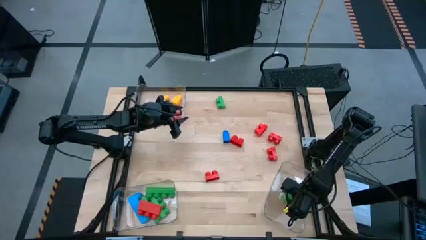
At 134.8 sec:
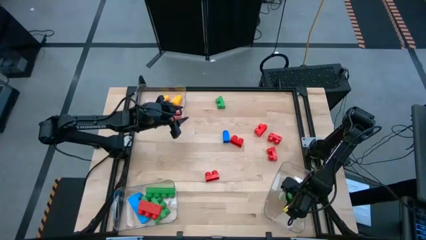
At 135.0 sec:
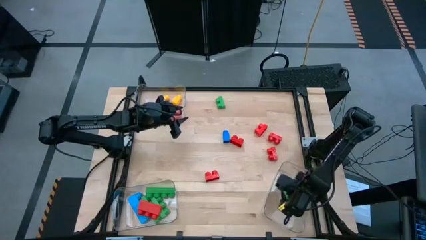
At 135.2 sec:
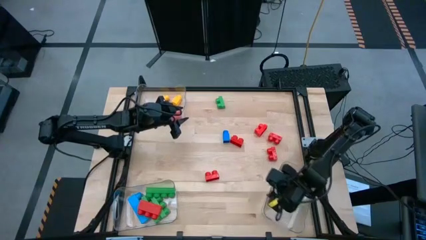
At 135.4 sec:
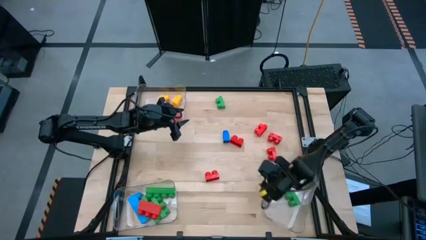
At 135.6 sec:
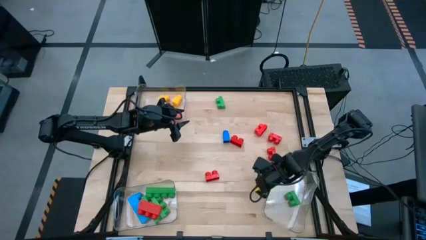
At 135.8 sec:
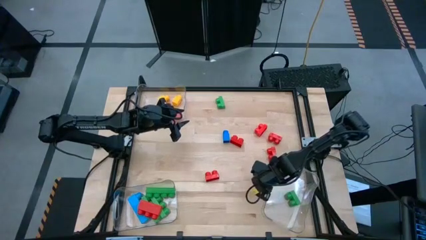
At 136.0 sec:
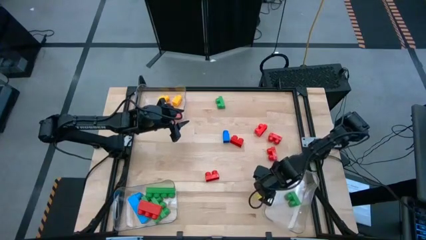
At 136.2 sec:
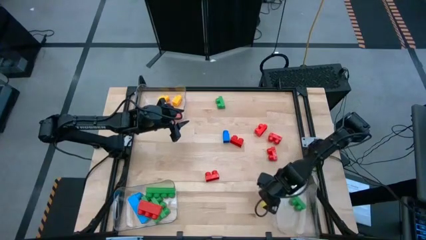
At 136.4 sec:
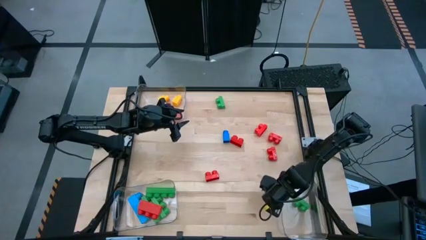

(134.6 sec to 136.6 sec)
Task: Sort blocks by size
Adjust the bottom right transparent bin

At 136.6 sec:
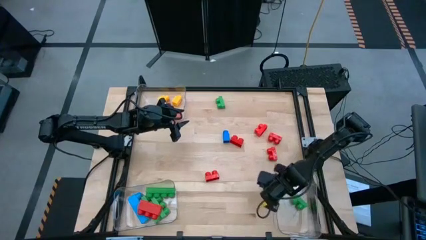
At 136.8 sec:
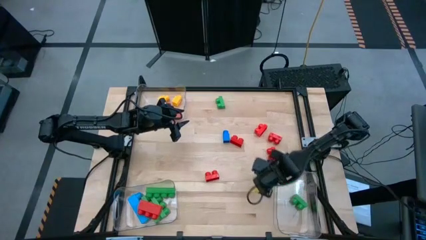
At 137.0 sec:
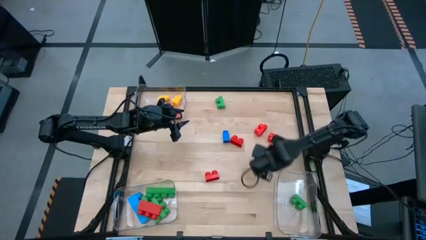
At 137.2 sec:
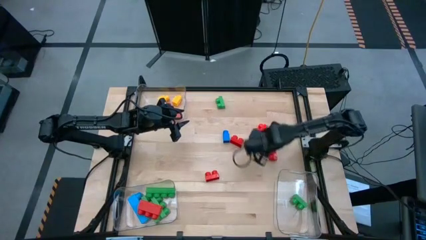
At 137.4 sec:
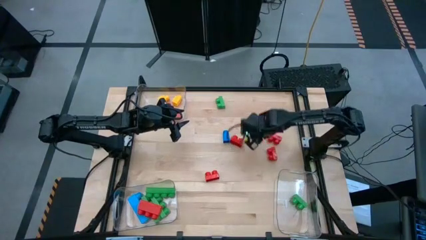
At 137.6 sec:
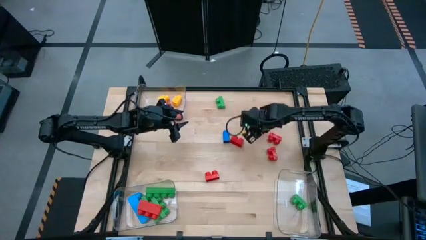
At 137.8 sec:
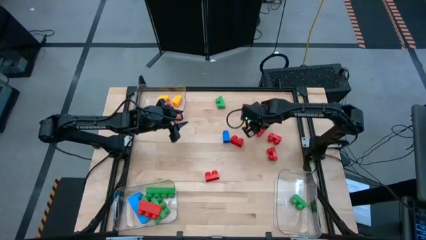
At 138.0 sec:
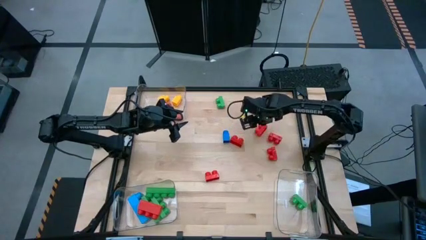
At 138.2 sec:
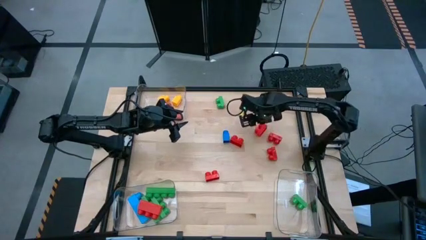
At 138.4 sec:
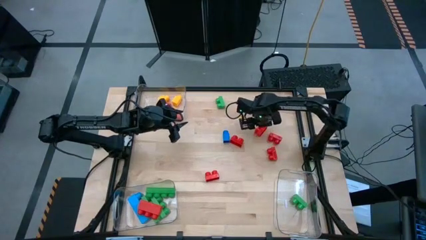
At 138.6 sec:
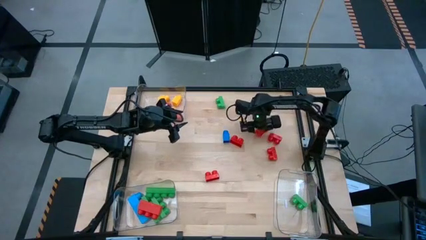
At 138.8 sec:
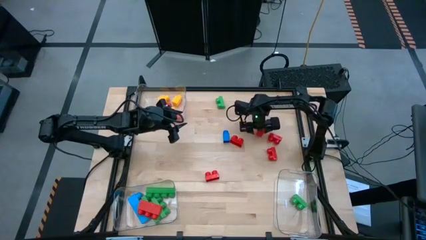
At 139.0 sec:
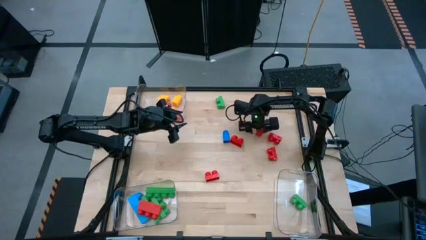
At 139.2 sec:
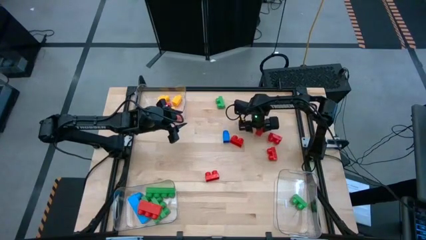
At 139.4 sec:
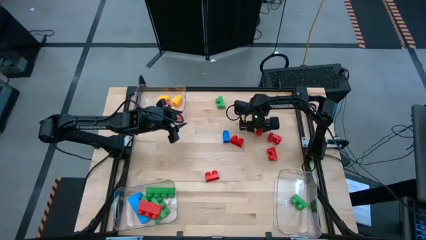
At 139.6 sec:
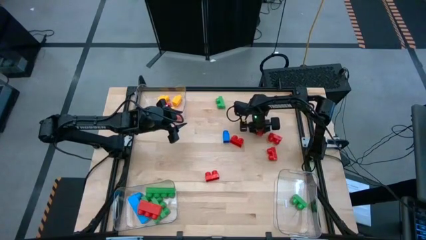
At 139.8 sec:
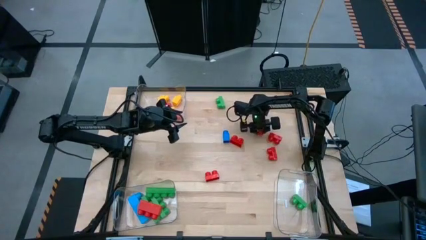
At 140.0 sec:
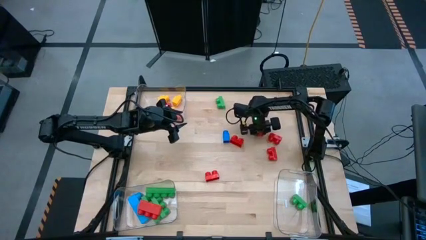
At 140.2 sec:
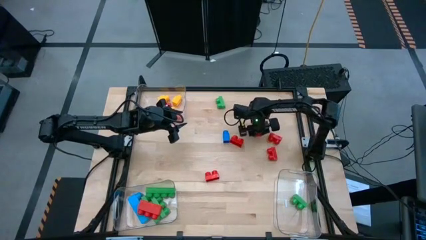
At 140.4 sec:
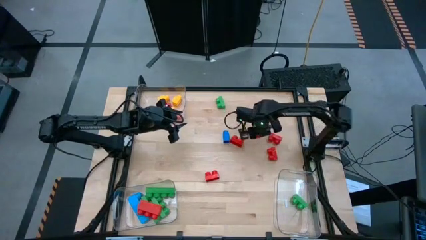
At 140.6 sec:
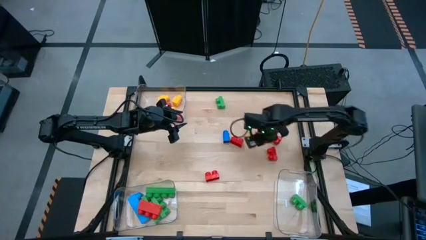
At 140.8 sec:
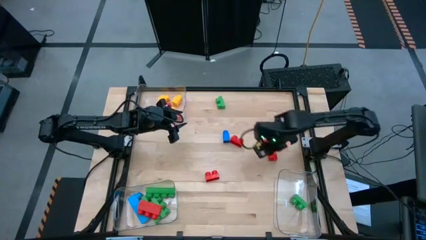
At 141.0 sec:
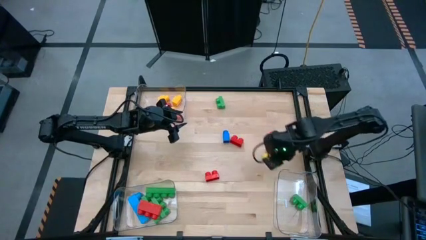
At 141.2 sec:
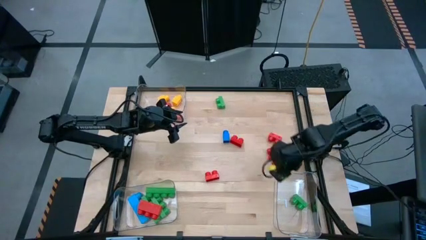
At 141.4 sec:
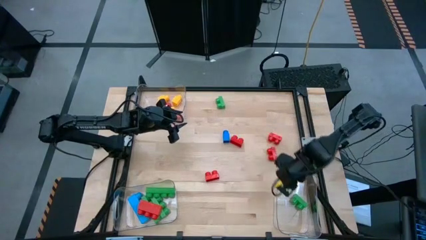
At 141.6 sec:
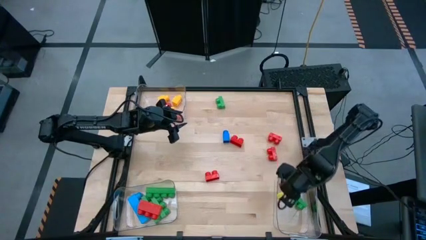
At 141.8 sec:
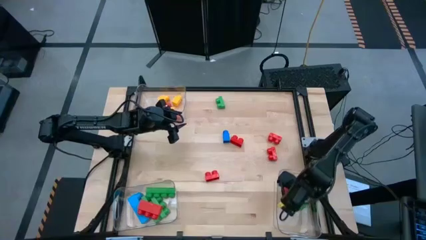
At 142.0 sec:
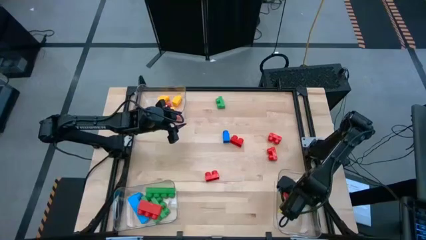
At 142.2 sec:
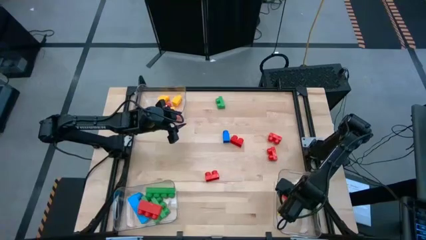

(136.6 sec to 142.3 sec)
Put the two-stud red game piece into the bottom right transparent bin

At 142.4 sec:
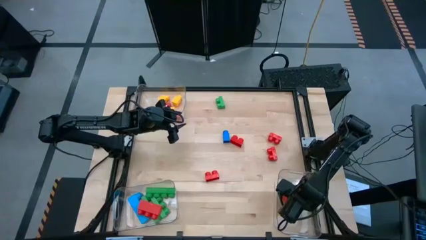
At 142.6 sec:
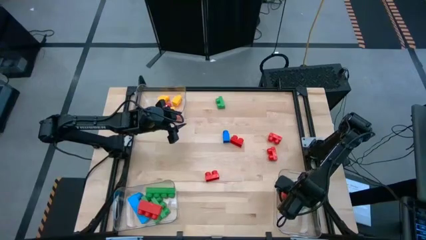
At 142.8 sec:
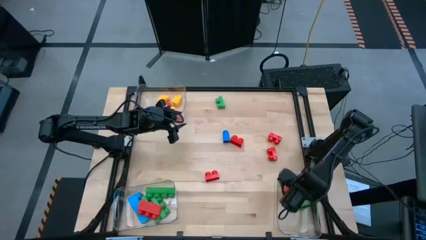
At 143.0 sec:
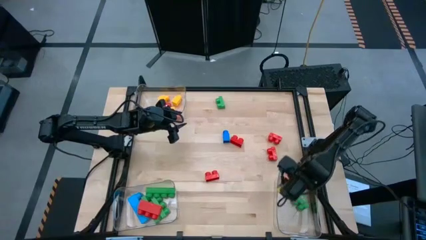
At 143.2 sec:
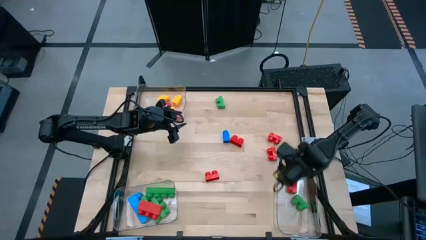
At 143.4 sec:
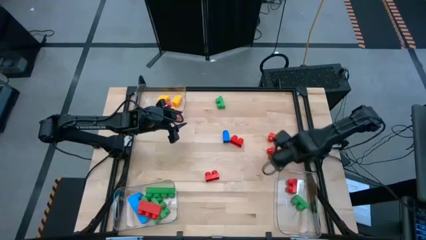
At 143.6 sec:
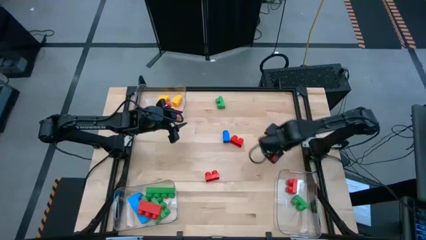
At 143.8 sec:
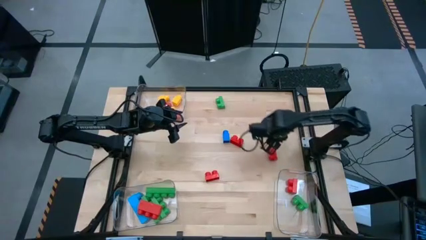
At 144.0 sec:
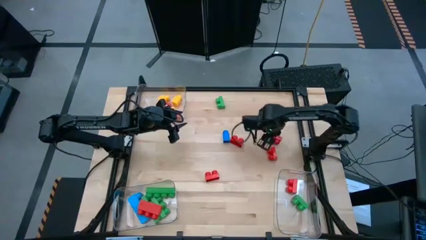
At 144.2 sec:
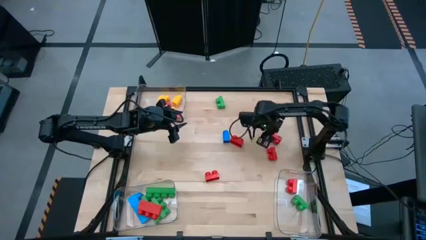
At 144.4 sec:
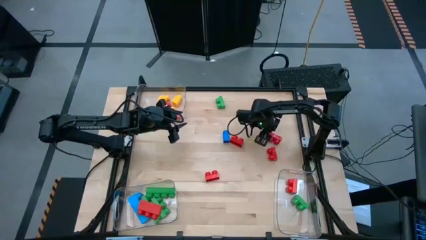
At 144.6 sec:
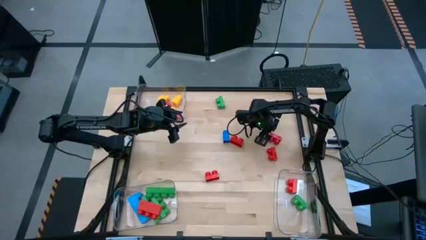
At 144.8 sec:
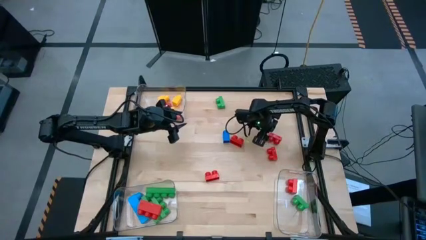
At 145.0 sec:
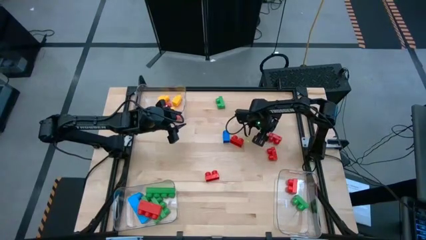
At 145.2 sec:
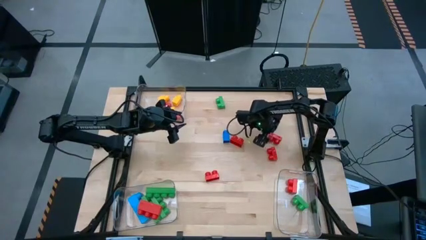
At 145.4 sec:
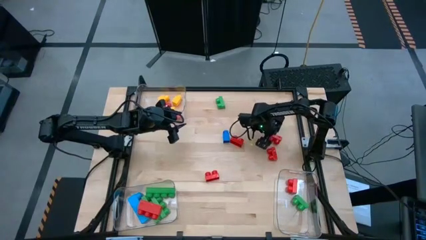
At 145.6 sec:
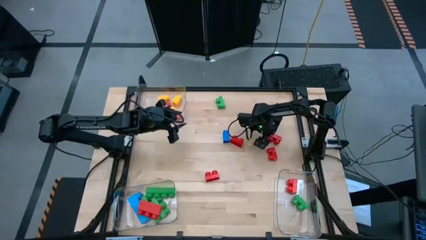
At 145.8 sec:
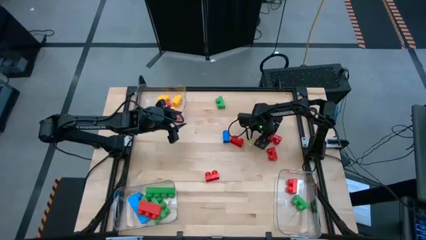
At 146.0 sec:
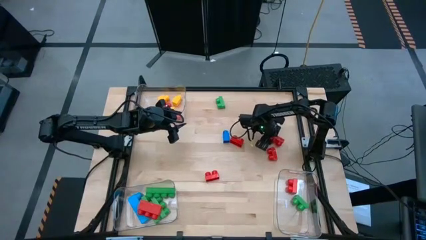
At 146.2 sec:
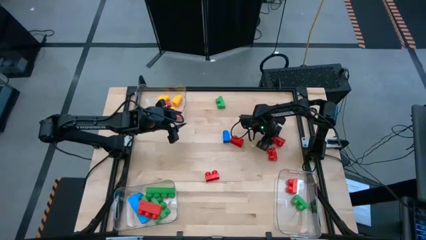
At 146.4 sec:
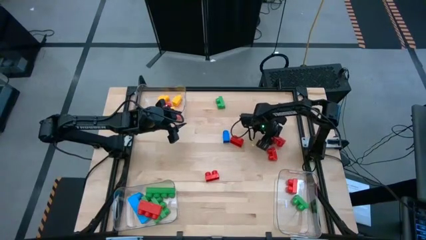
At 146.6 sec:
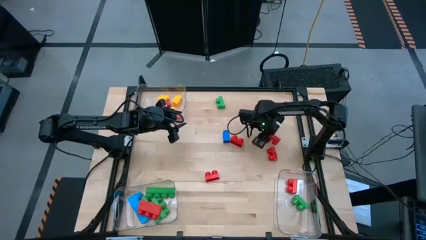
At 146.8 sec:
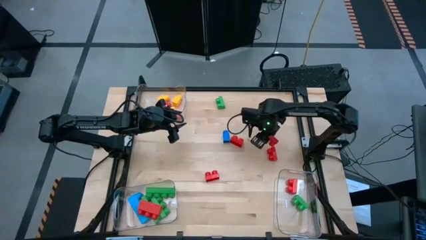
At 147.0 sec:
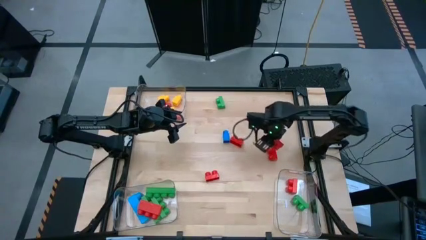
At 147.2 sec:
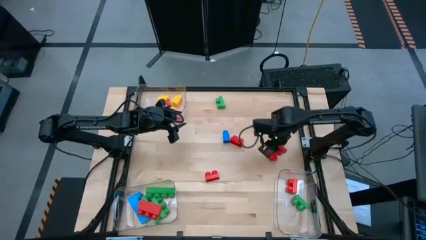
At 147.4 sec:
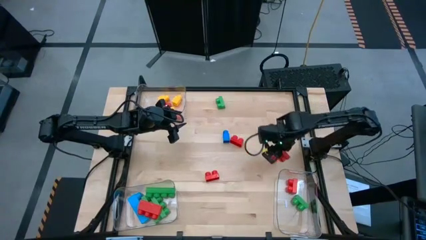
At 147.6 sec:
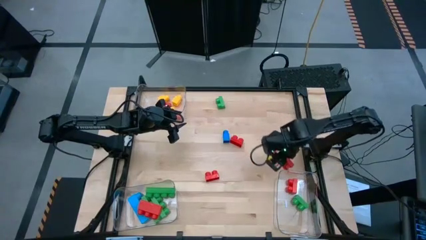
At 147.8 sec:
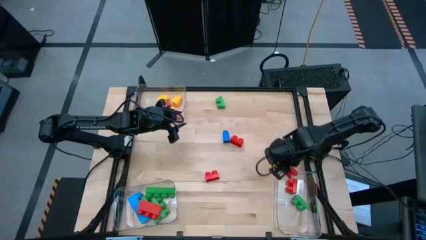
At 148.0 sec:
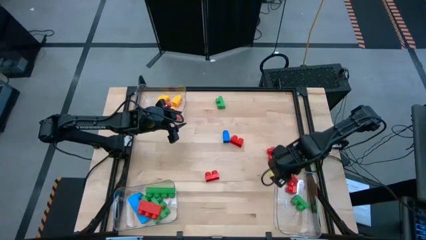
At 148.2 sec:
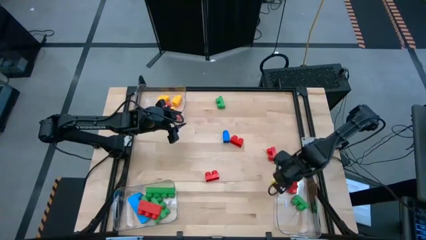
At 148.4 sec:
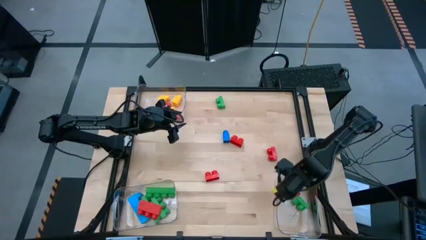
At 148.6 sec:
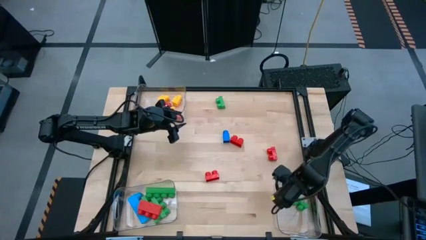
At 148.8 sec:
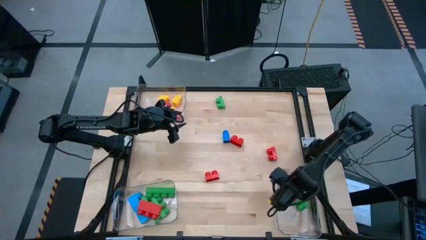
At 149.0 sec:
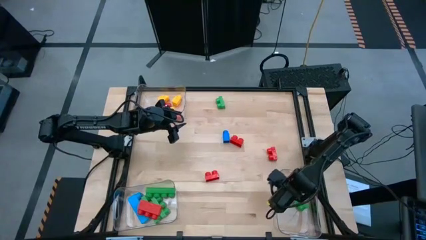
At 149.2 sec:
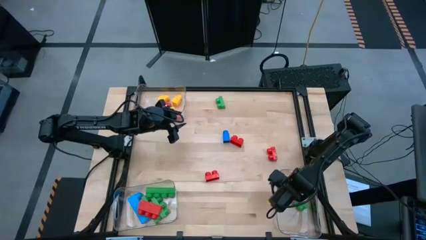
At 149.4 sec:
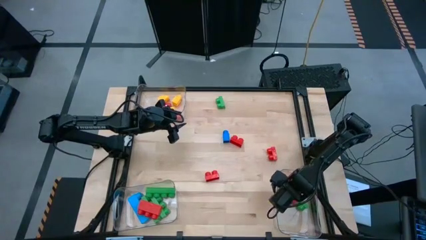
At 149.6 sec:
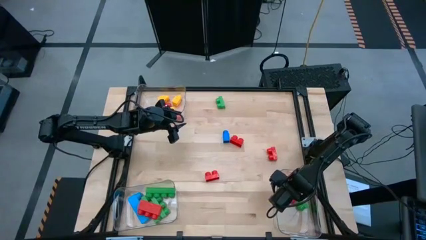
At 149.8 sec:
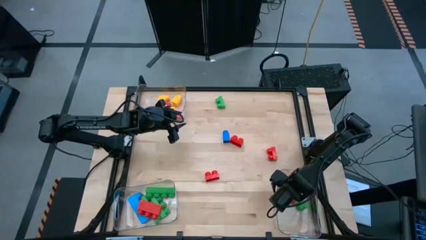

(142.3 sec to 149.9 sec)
Put the two-stud red game piece into the bottom right transparent bin

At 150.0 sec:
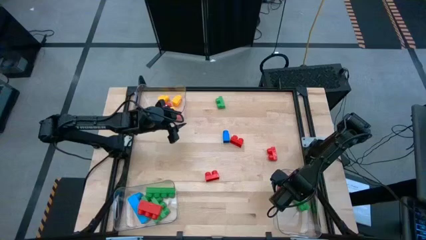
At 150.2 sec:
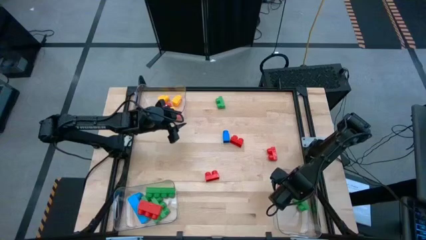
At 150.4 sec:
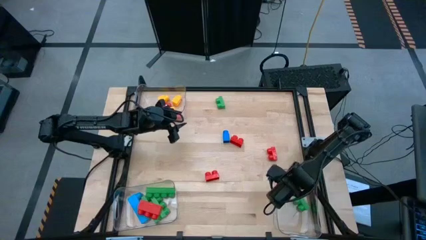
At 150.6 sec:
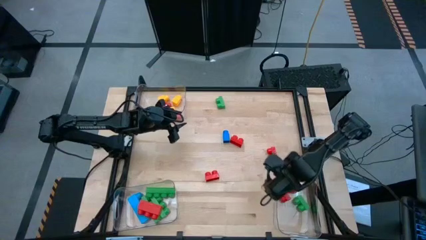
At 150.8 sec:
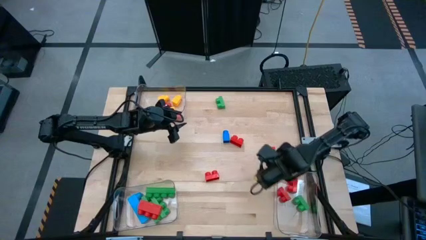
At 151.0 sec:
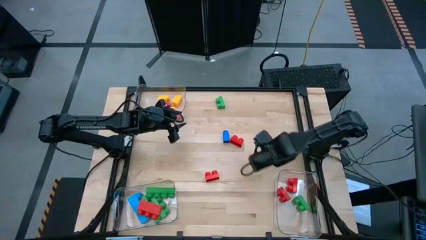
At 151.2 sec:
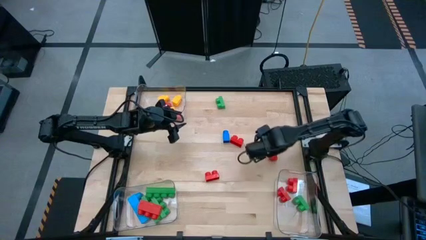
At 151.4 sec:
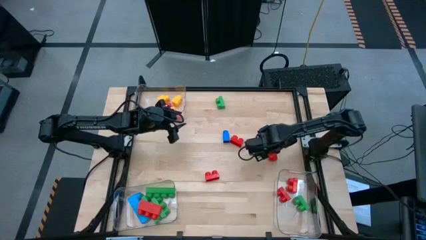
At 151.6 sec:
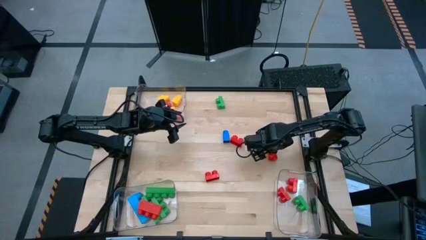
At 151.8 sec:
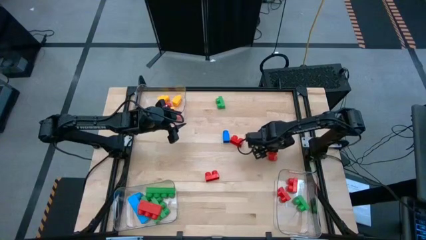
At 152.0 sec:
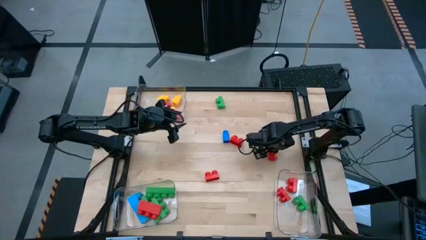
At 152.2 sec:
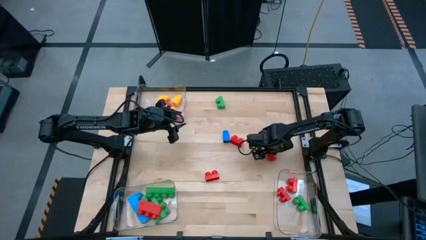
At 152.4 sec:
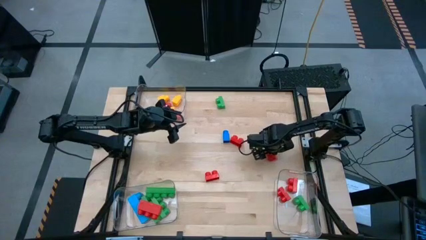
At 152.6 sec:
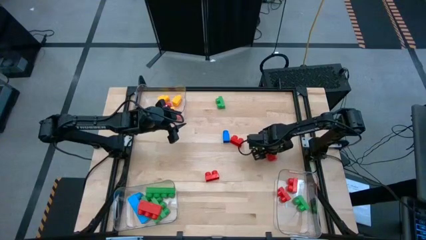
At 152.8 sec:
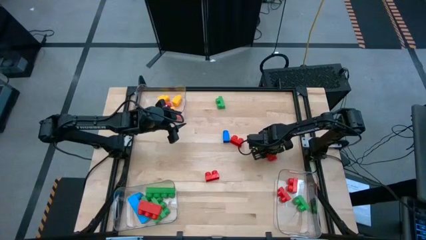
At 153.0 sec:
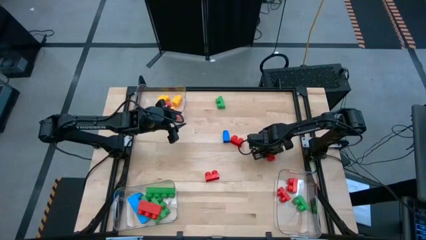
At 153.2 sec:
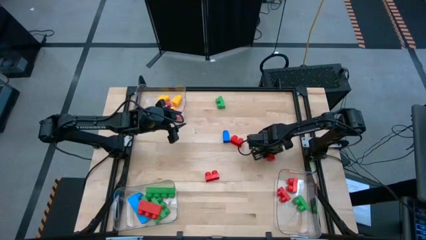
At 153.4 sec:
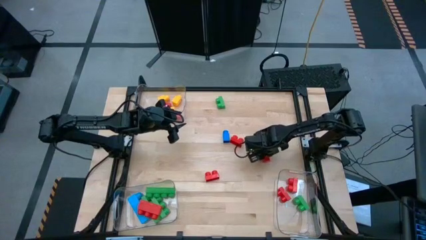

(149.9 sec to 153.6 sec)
Put the two-stud red game piece into the bottom right transparent bin
